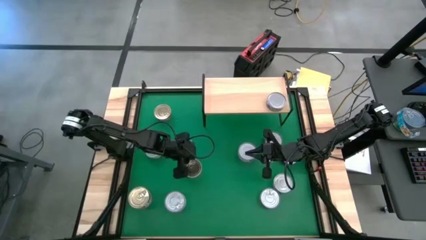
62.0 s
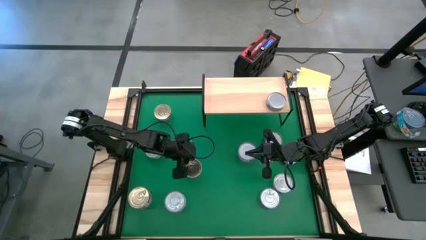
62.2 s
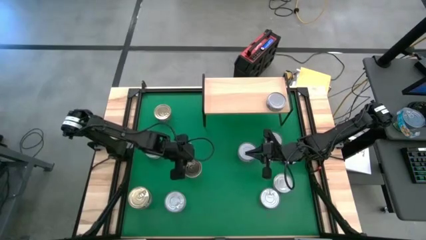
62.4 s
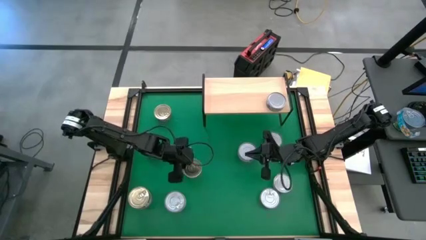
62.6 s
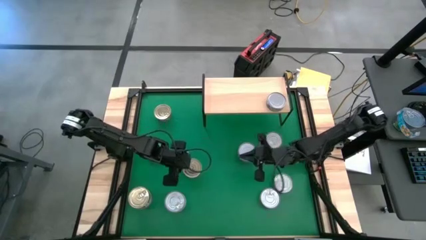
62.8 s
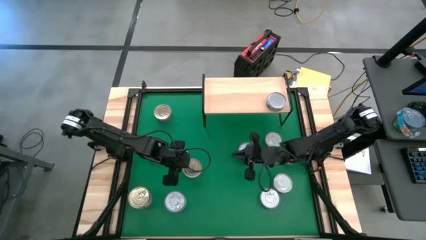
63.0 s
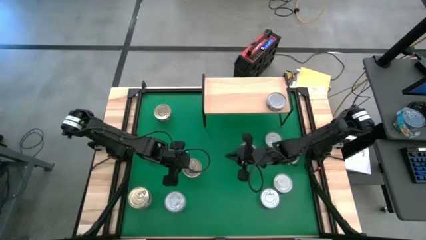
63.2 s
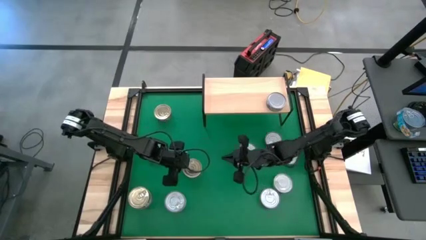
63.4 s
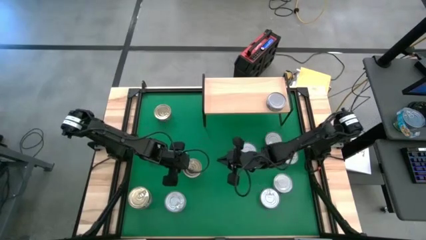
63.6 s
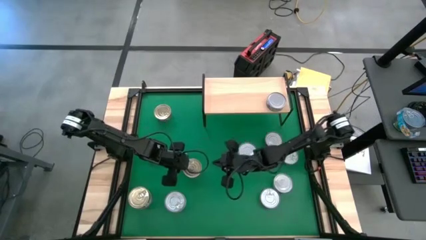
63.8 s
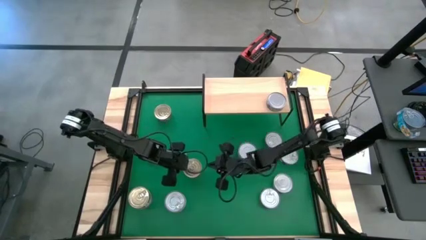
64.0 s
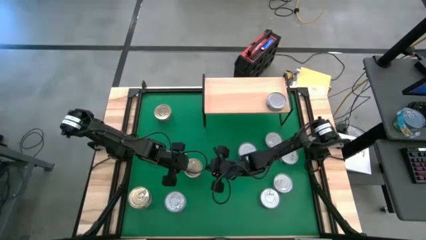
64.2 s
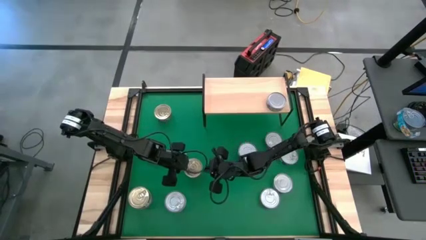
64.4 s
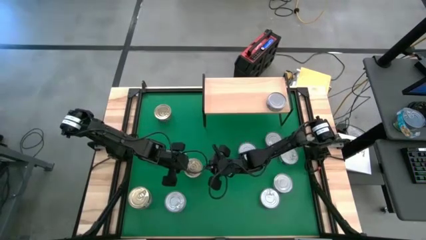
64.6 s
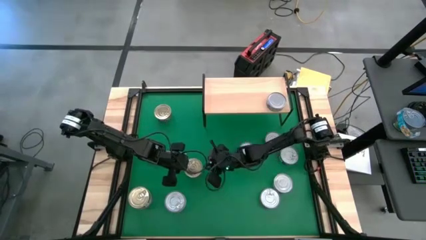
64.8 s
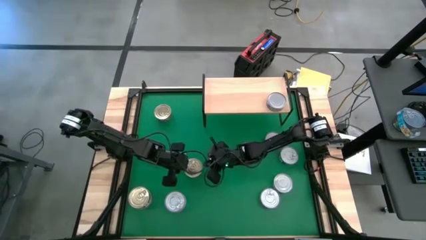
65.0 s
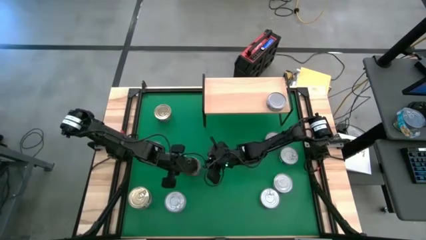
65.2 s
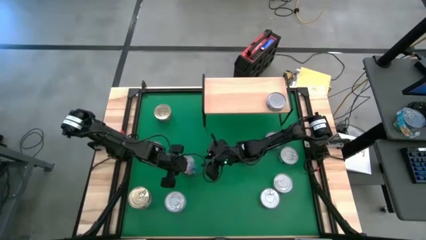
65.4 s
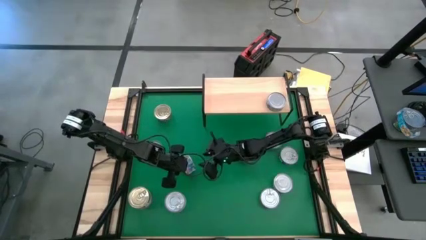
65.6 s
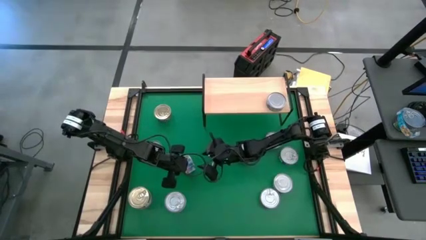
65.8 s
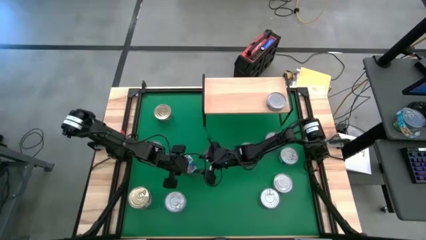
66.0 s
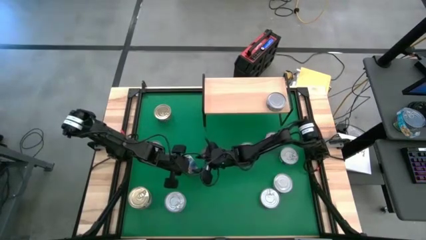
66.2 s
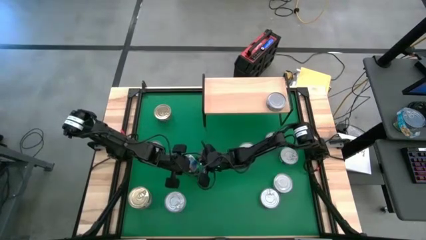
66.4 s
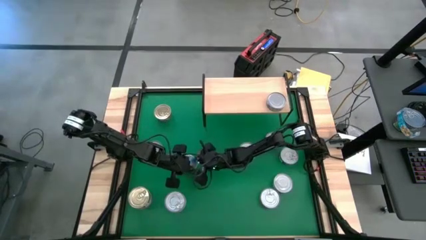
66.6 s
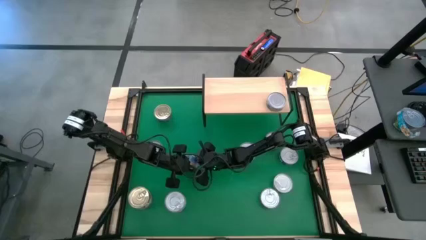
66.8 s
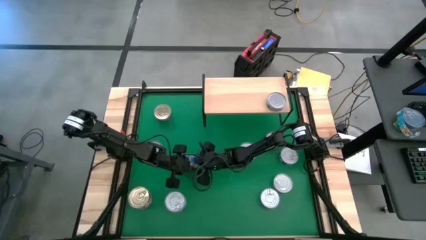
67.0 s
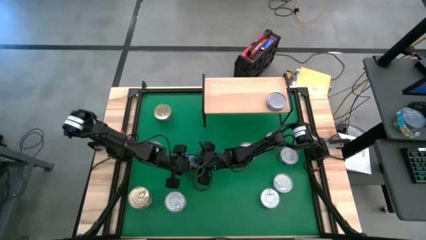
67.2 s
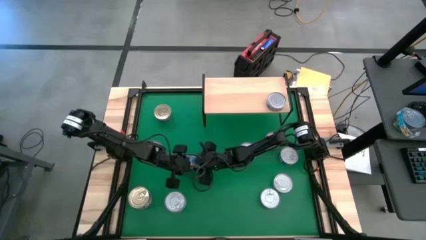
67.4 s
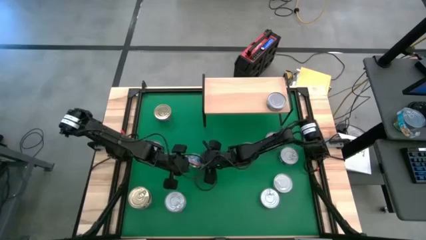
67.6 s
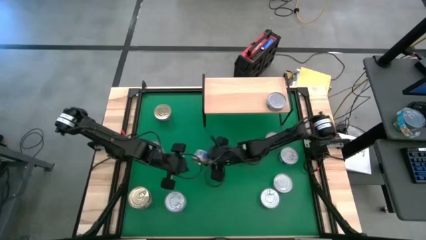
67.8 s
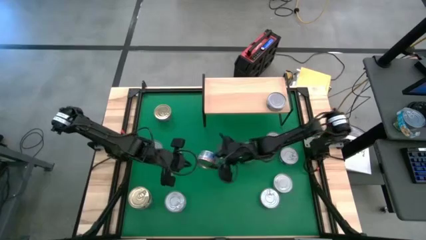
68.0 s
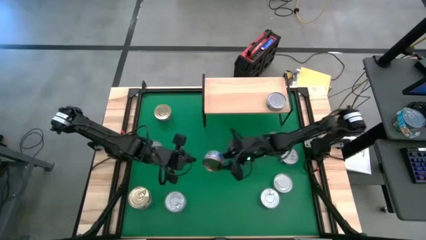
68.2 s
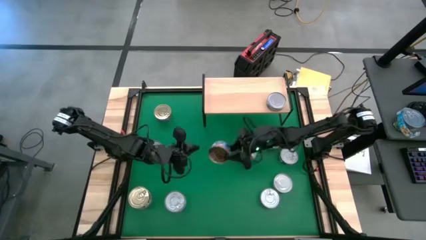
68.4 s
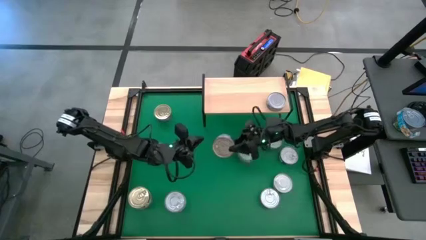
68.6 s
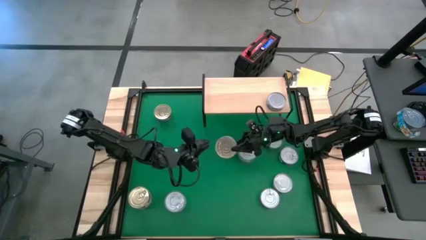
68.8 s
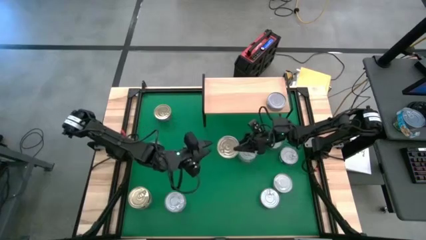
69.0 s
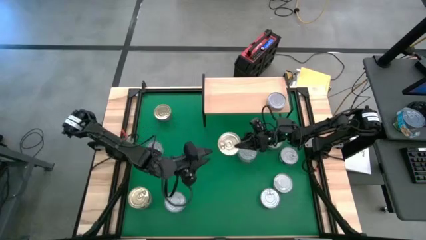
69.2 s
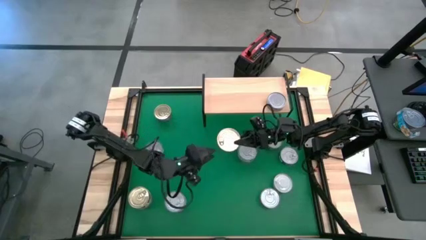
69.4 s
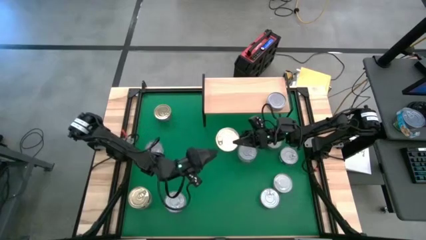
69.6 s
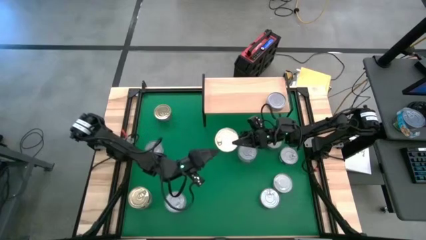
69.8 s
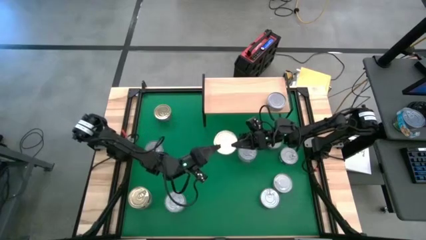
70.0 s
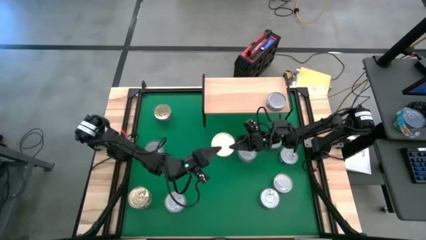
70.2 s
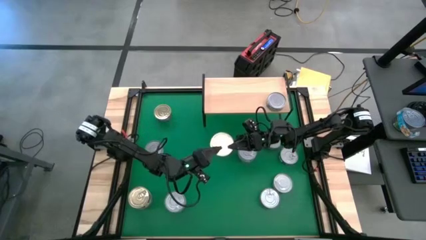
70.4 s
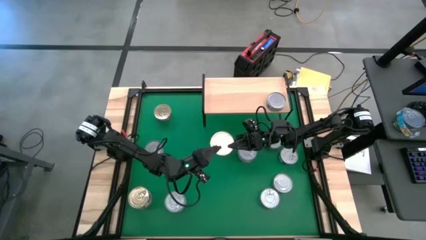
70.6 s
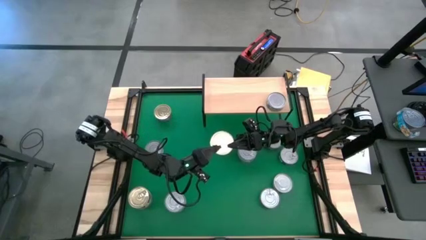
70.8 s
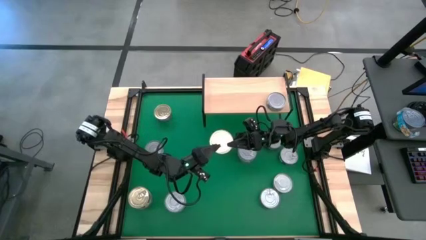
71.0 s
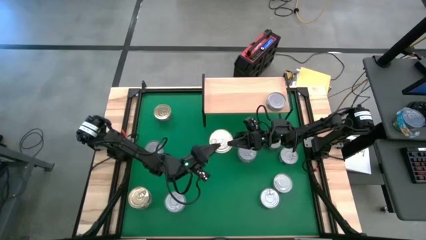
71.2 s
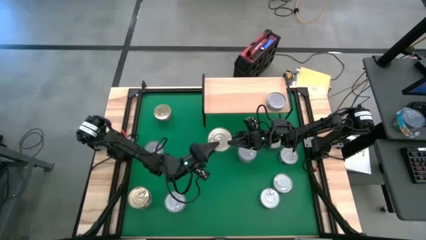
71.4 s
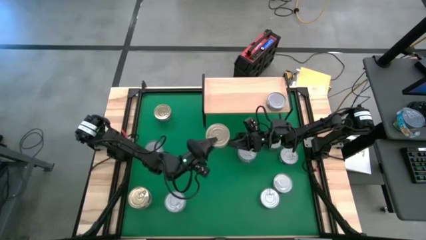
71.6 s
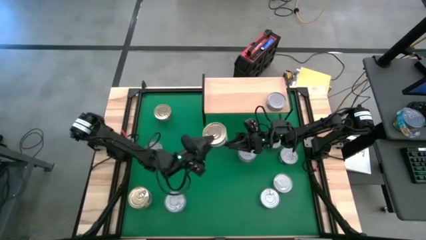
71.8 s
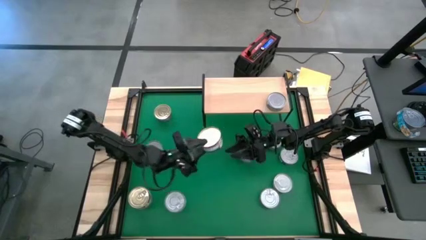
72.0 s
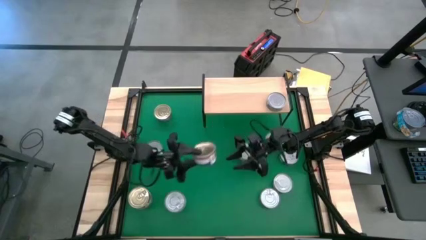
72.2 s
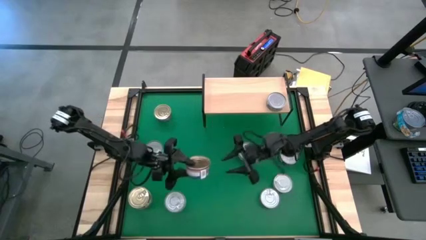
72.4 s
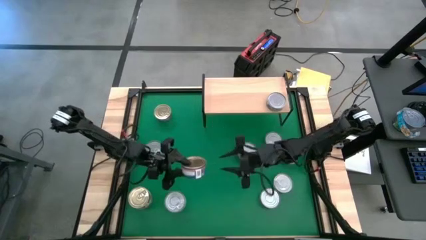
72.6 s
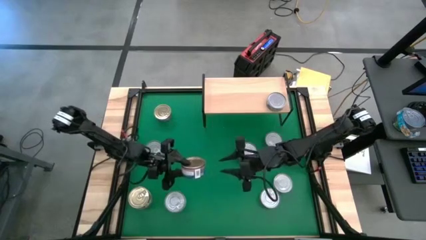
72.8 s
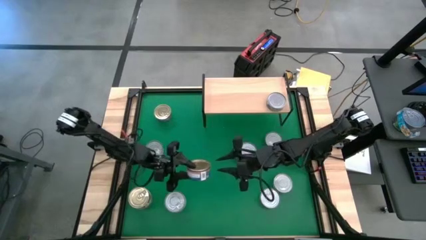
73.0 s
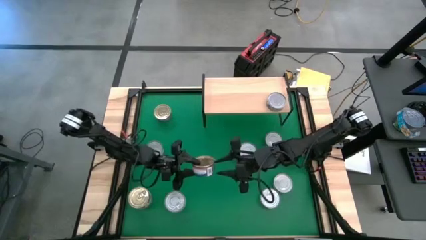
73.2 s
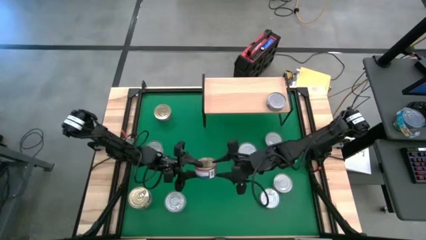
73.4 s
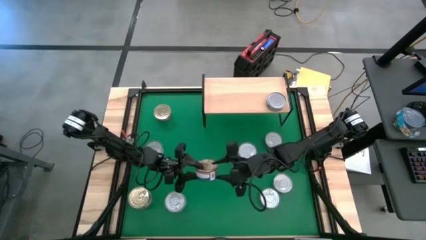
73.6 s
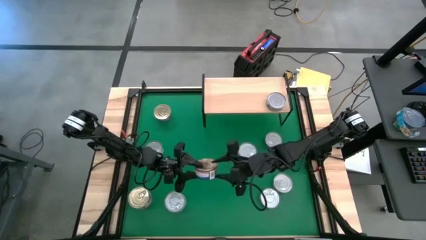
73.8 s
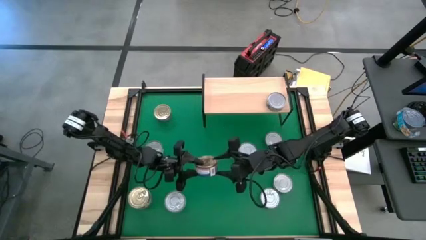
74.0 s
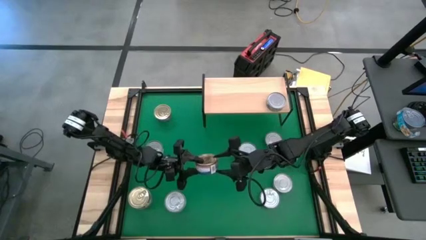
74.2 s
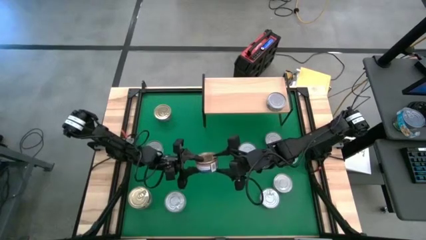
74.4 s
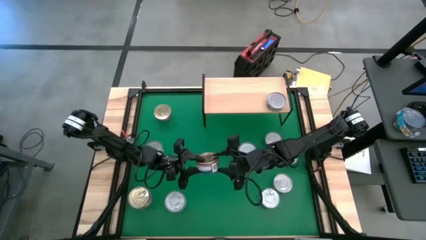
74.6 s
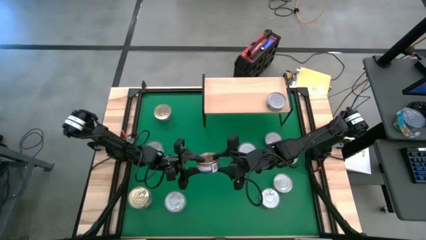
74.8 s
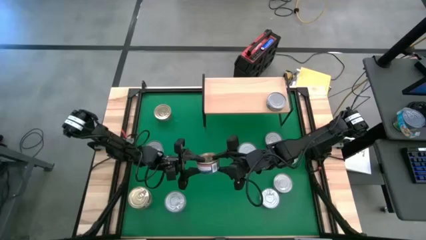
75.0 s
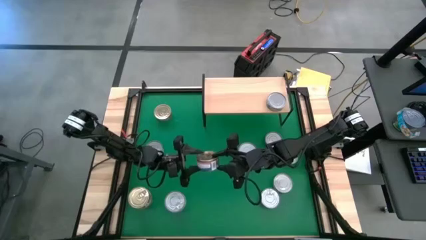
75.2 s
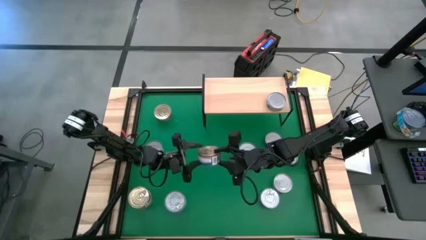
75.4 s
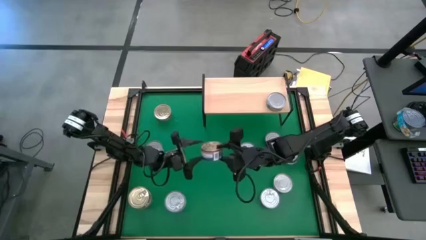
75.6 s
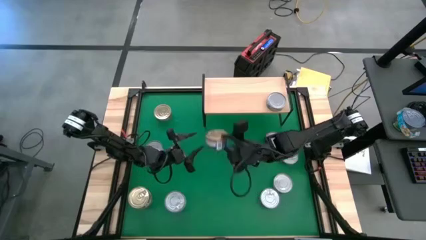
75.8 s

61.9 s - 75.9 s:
Task: Stack canned seafood by type on shelf
Put the blue/pink tuna can on the shelf
